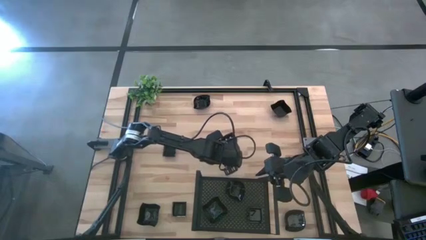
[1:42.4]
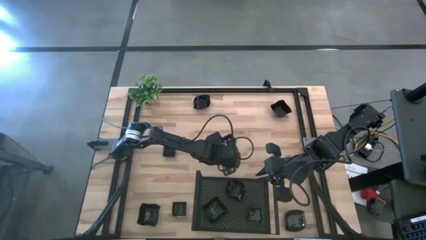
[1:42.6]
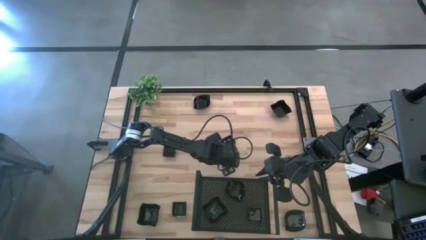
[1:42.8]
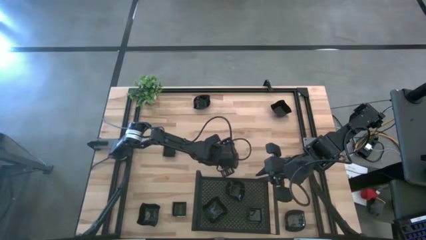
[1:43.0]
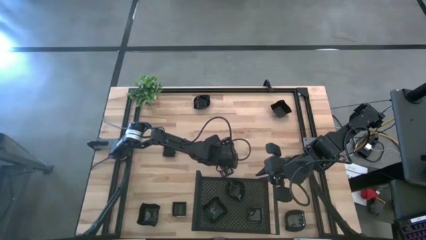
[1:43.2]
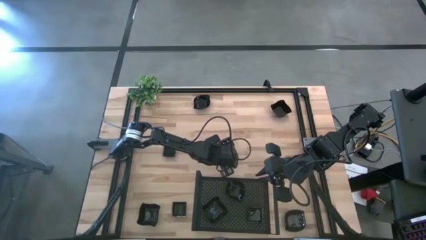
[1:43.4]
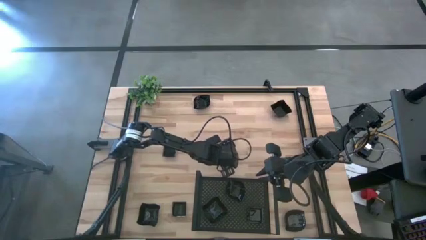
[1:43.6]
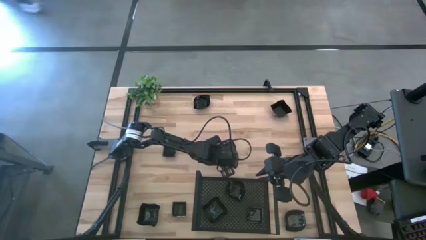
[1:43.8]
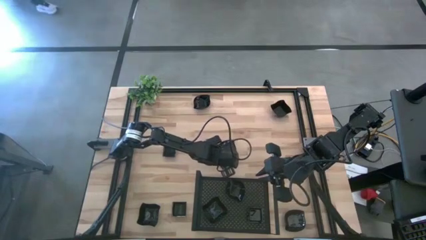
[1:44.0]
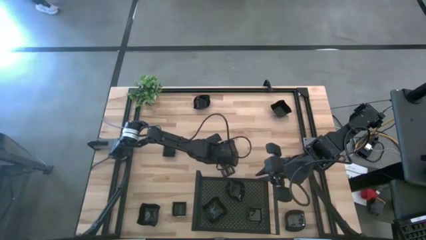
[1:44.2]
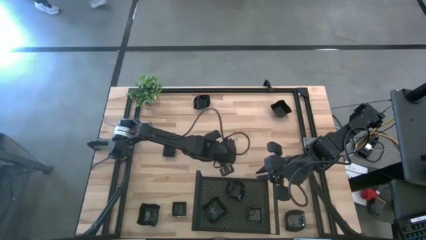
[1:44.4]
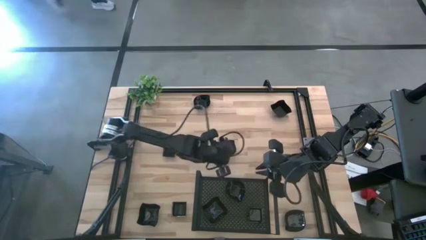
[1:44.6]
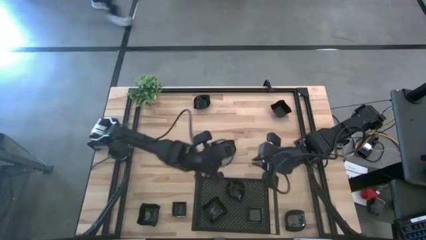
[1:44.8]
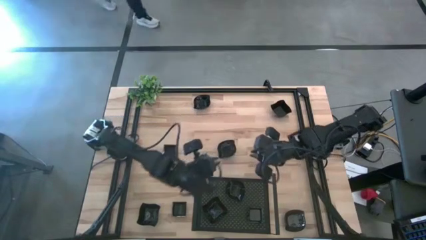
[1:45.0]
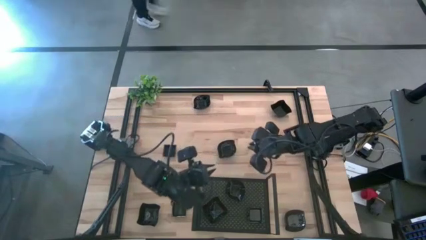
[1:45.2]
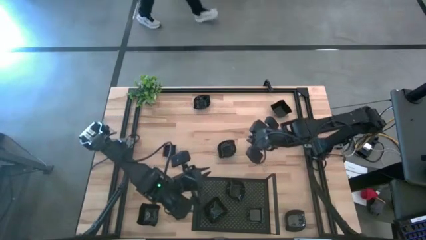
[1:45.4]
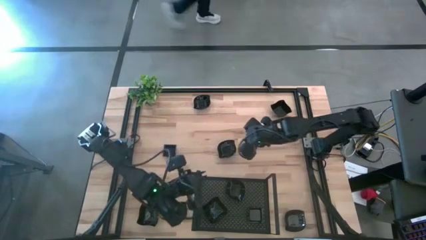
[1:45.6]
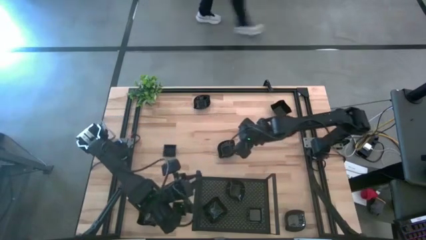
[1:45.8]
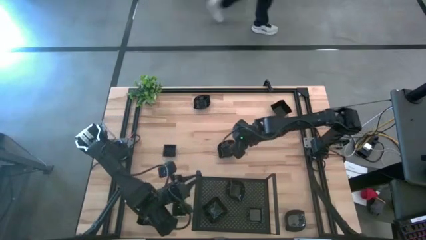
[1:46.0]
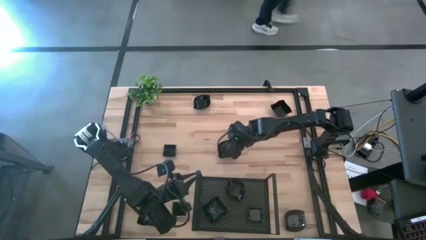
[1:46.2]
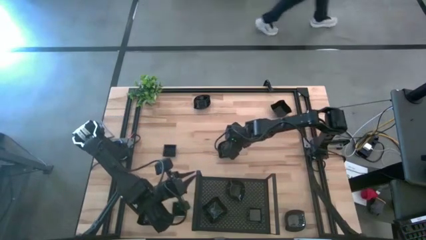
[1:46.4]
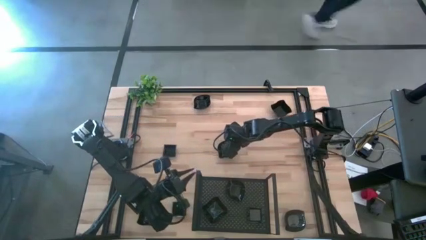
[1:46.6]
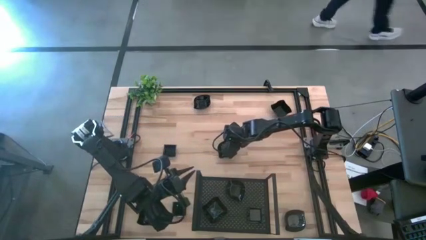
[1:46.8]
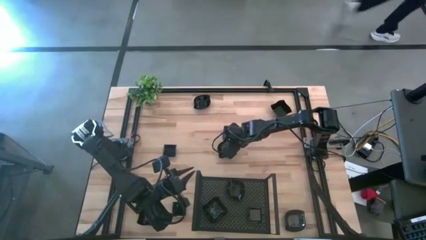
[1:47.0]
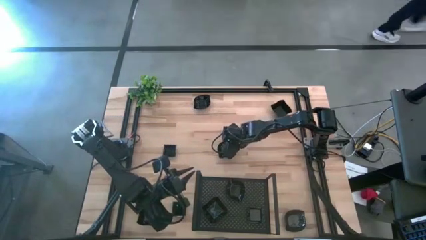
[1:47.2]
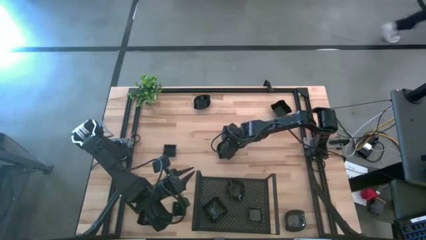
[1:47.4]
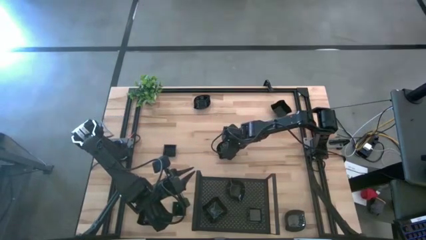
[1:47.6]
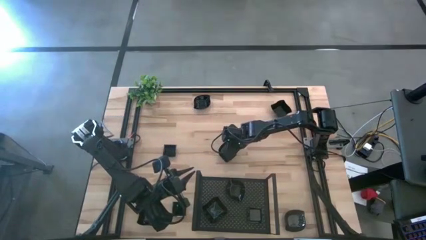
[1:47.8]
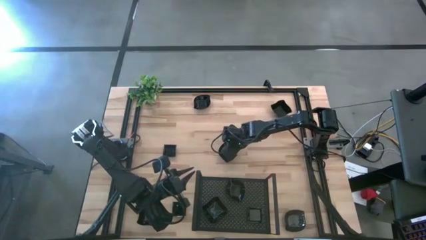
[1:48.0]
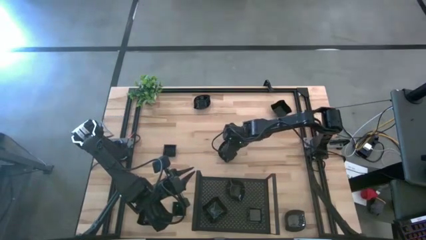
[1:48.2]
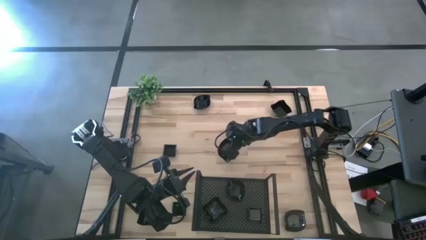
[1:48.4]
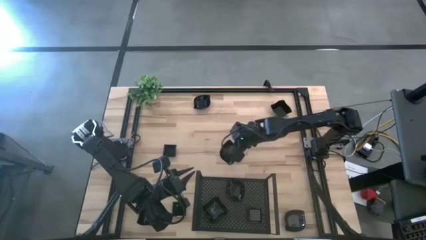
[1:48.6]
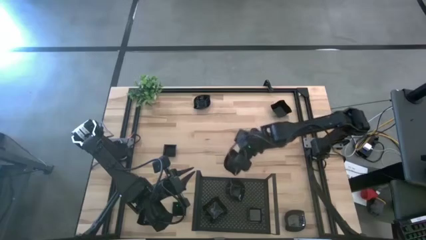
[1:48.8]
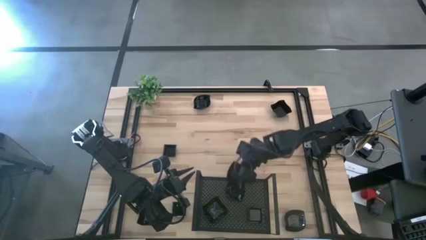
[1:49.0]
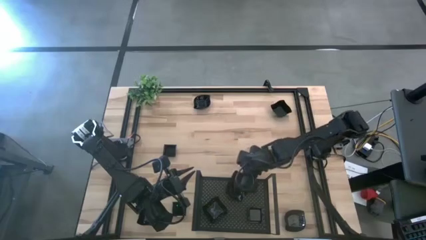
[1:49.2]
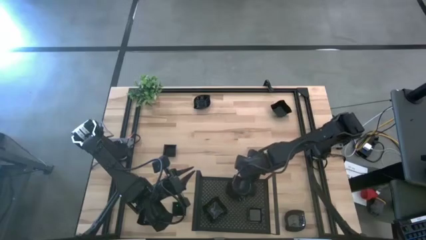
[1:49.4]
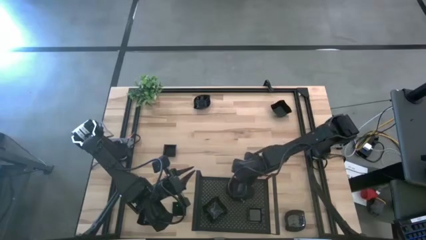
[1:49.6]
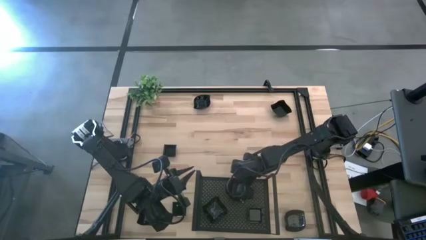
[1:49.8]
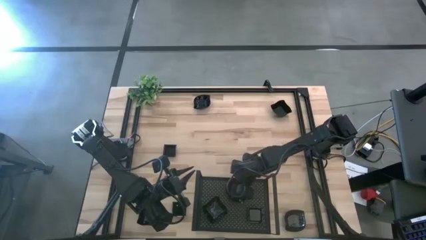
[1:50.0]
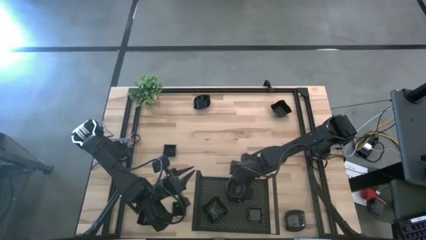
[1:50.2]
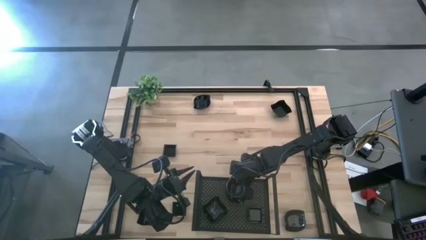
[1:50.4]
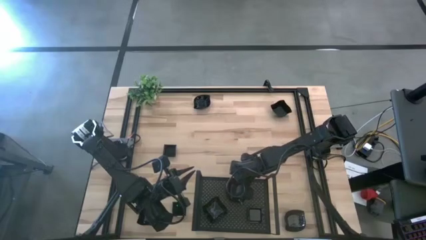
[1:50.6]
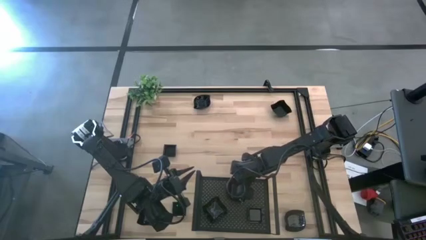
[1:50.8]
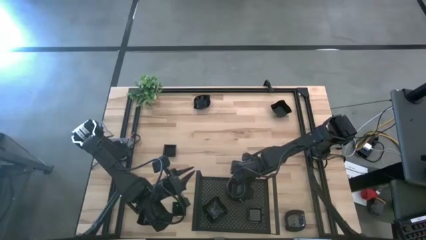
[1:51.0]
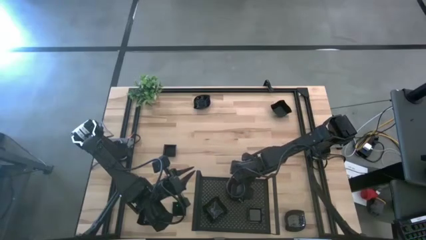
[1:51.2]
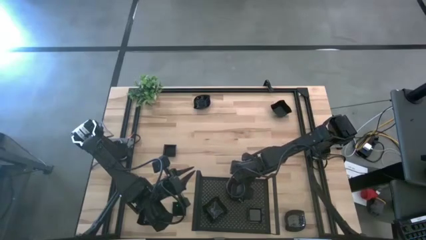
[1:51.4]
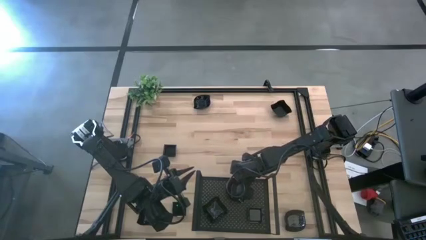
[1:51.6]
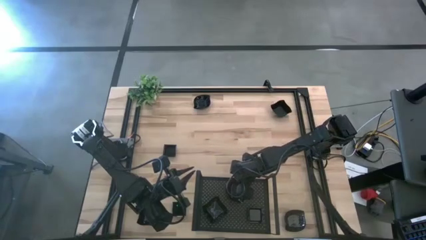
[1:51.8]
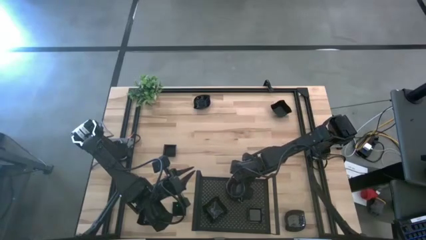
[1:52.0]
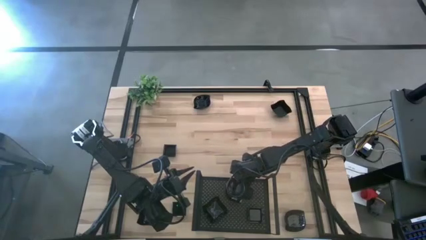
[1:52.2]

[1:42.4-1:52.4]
Task: Pick & Place Mini shaped plates
Stack the leaf shaped plate on top of the other leaf shaped plate on the shelf

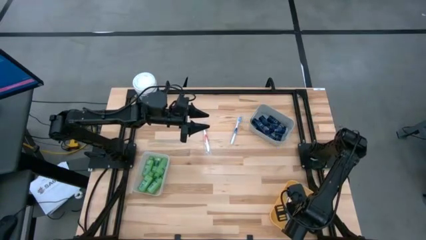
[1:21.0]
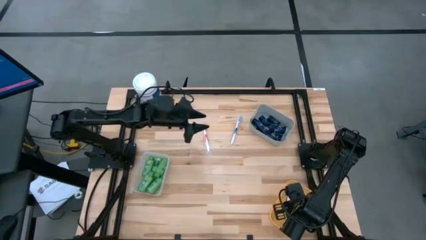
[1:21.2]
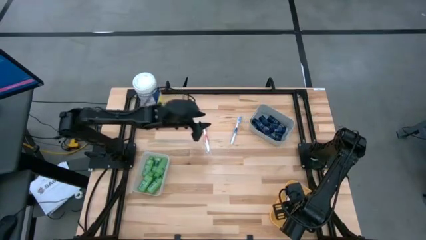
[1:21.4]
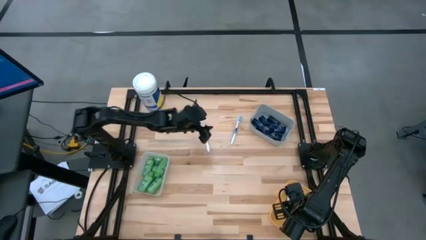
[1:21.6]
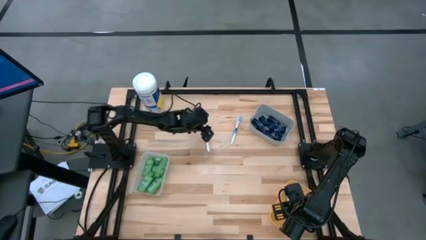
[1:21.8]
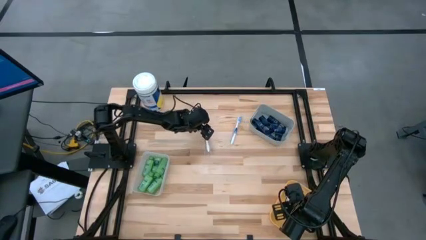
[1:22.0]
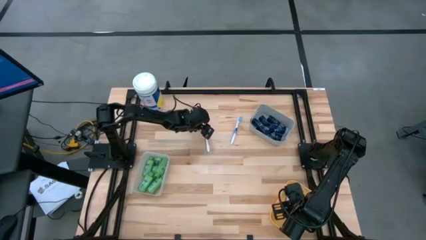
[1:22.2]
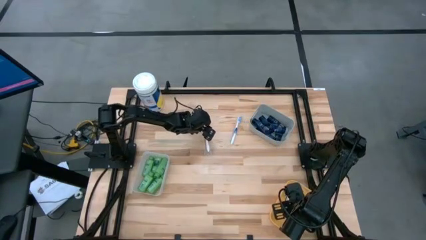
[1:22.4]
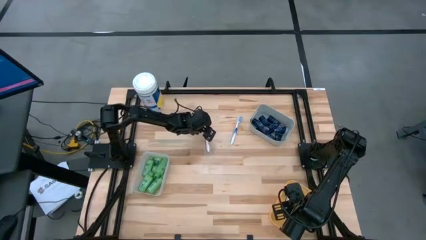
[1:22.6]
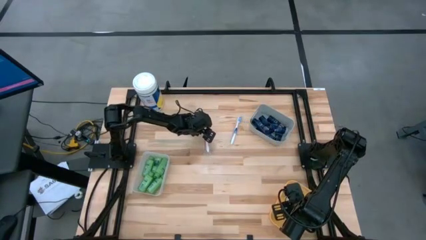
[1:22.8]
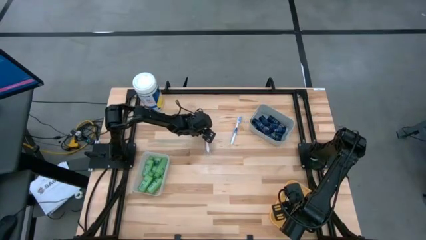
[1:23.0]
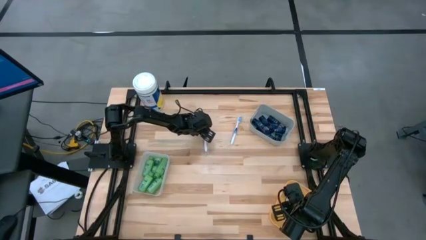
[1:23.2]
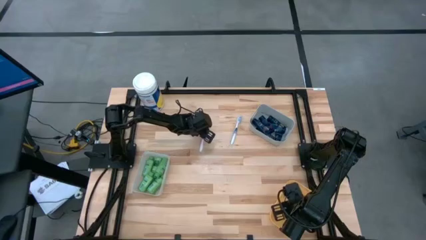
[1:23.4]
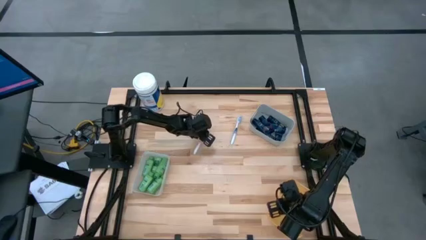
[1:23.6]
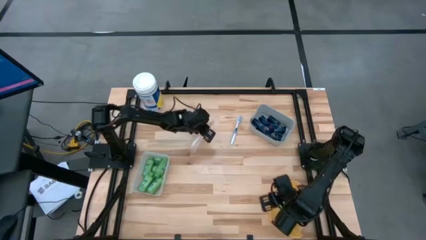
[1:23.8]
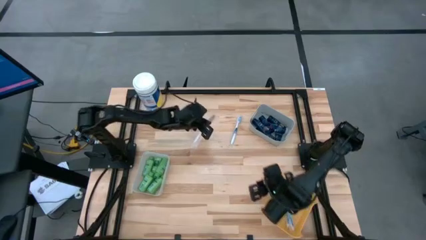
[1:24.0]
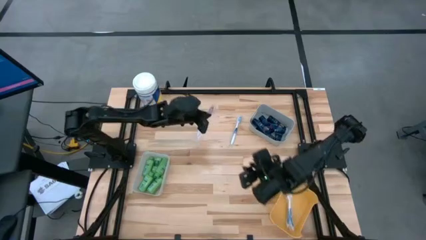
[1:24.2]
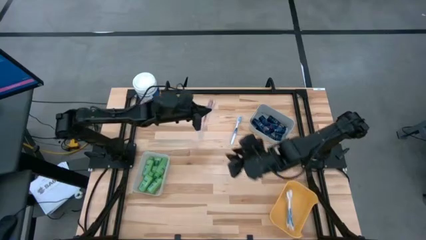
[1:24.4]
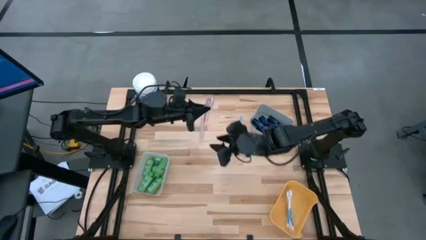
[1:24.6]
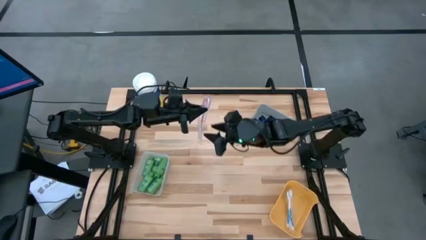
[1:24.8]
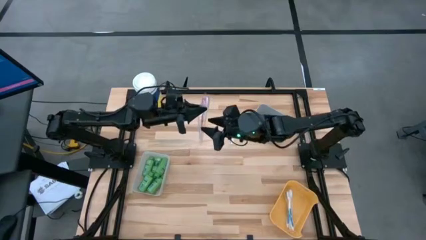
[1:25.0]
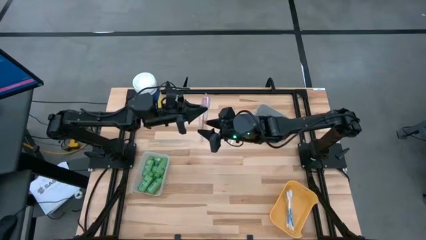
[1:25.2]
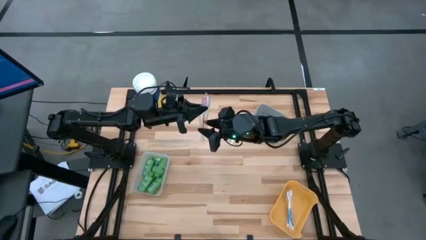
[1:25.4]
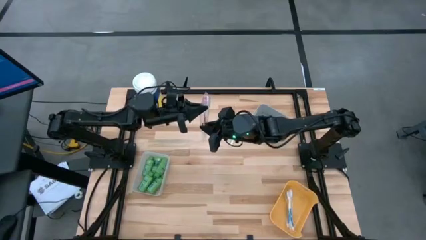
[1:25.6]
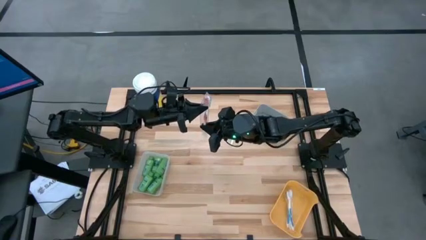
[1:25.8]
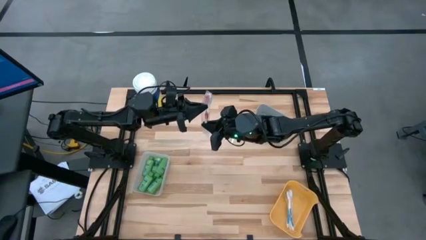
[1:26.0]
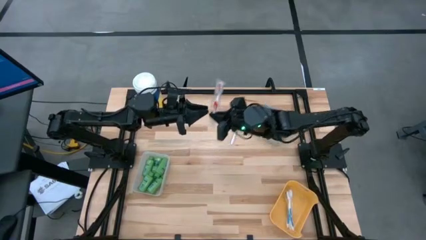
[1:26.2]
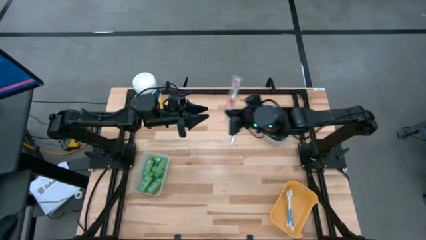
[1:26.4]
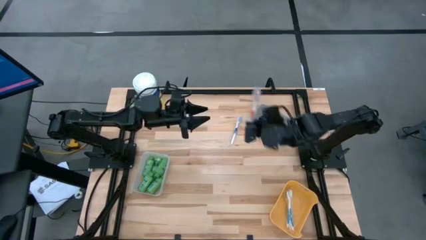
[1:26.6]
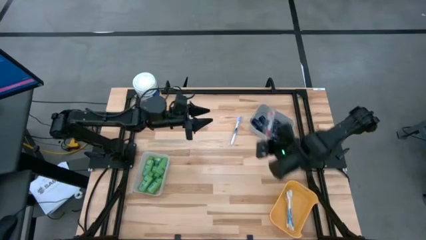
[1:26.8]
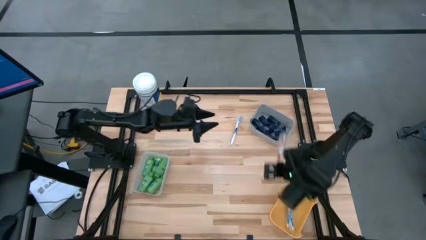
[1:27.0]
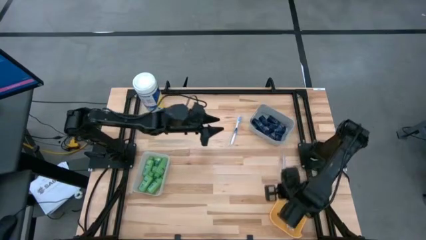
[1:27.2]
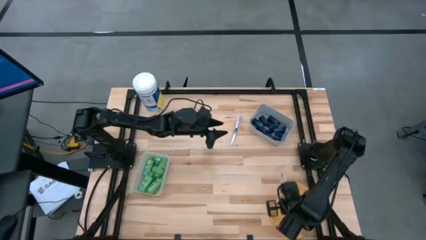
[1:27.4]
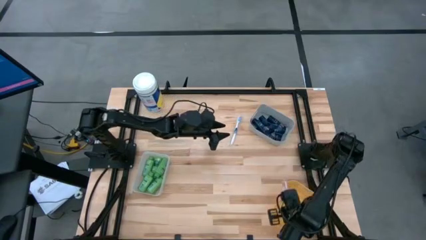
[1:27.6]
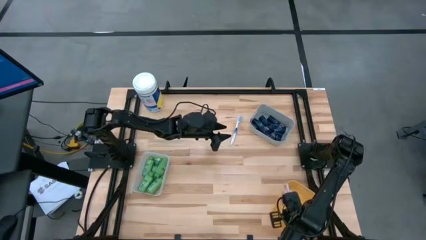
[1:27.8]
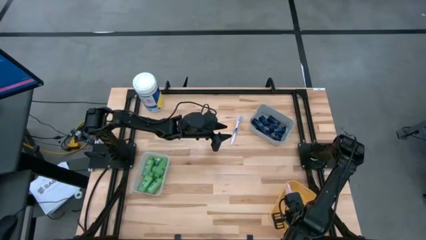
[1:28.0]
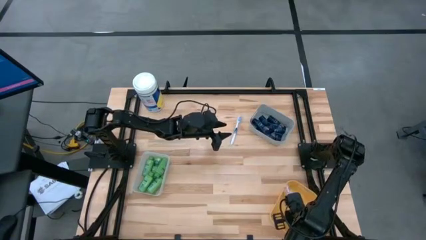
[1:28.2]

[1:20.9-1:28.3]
Task: Pick & Place Travel size toiletries
Put the orange toothbrush into the yellow bin
